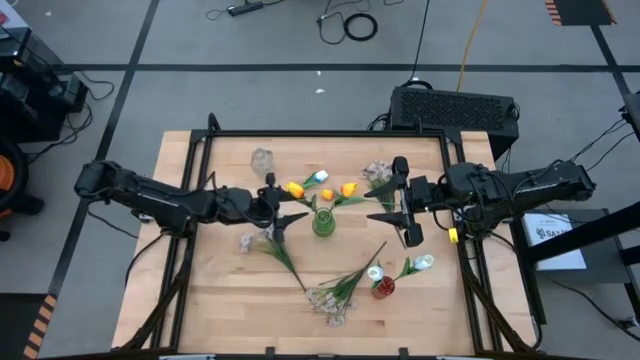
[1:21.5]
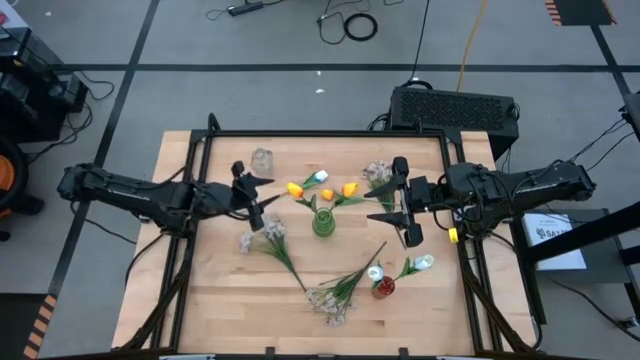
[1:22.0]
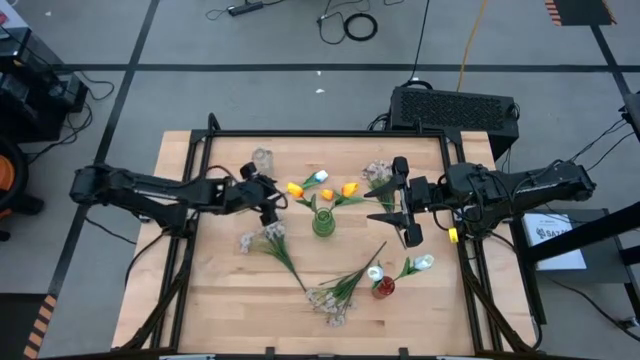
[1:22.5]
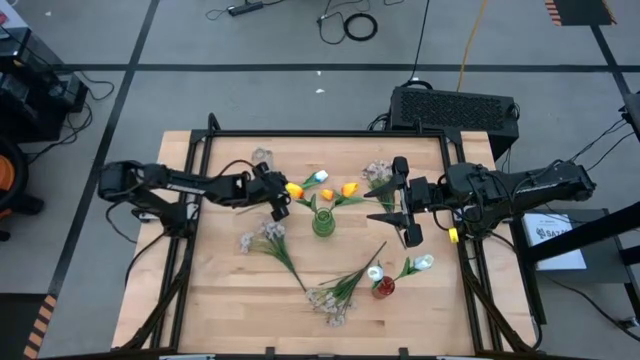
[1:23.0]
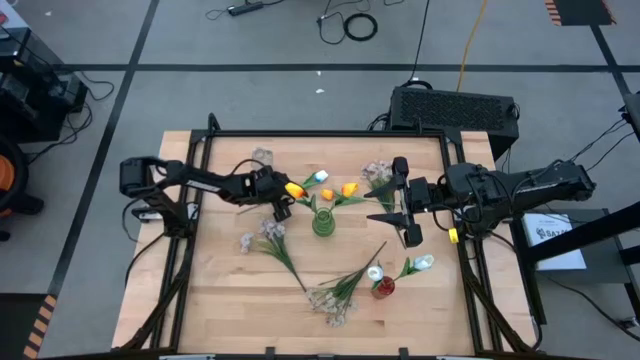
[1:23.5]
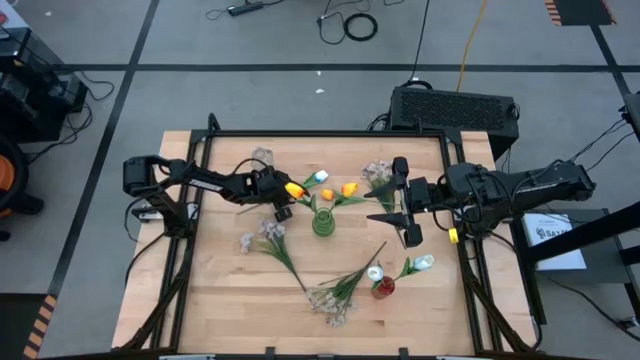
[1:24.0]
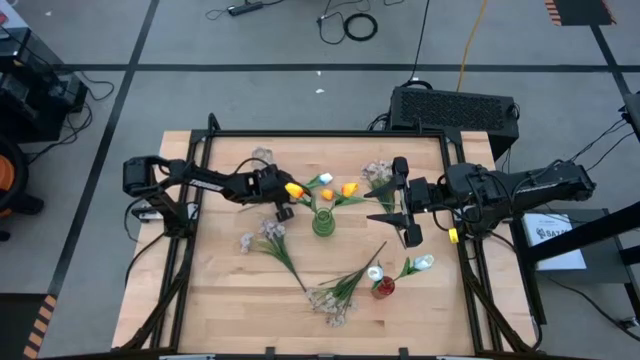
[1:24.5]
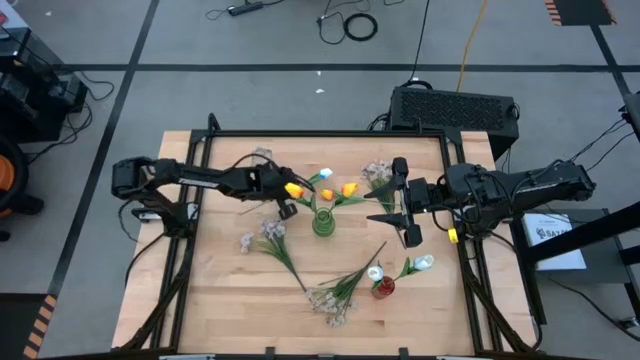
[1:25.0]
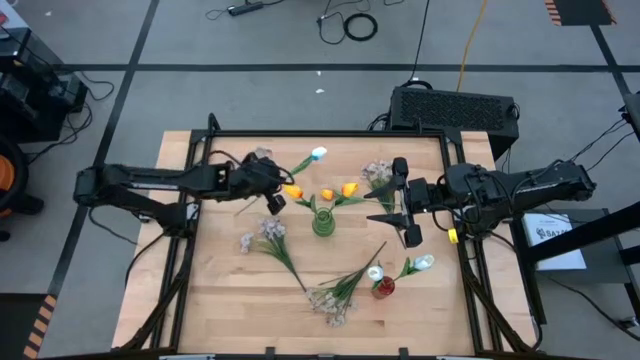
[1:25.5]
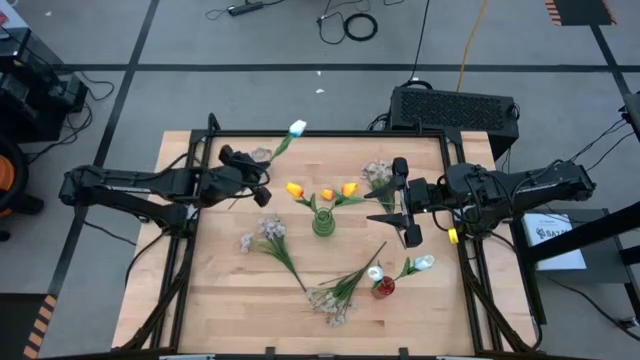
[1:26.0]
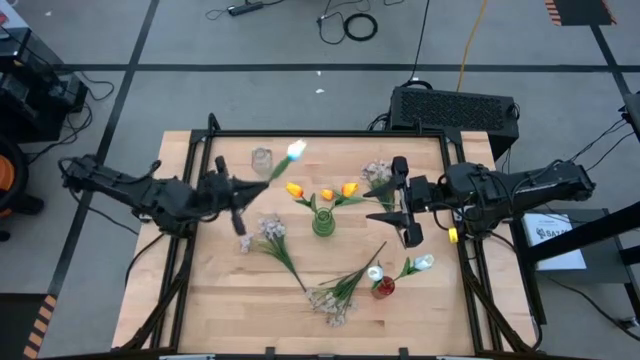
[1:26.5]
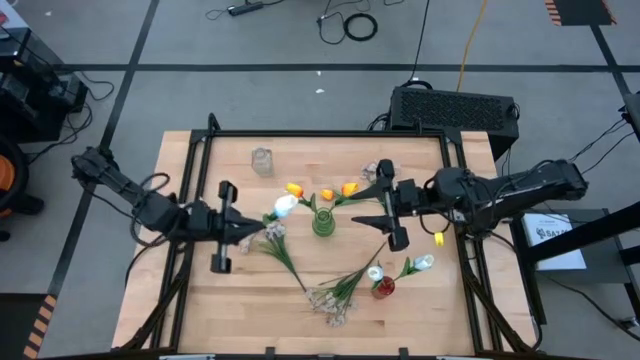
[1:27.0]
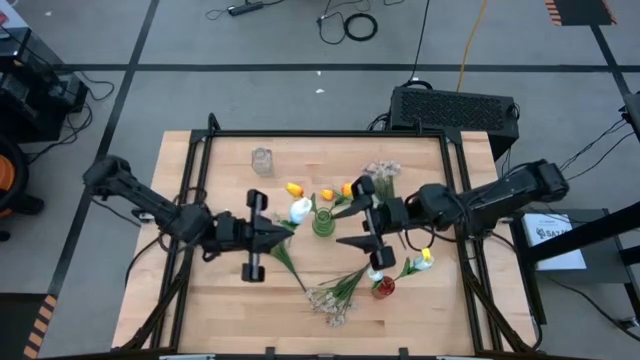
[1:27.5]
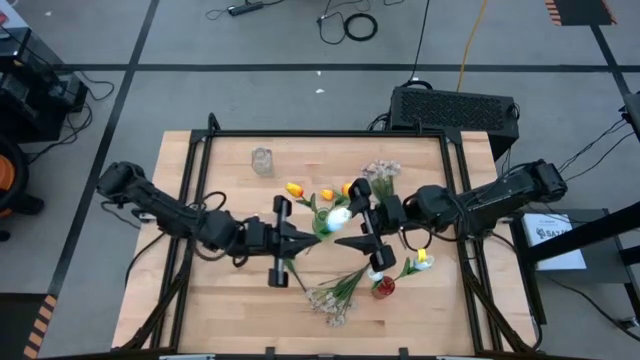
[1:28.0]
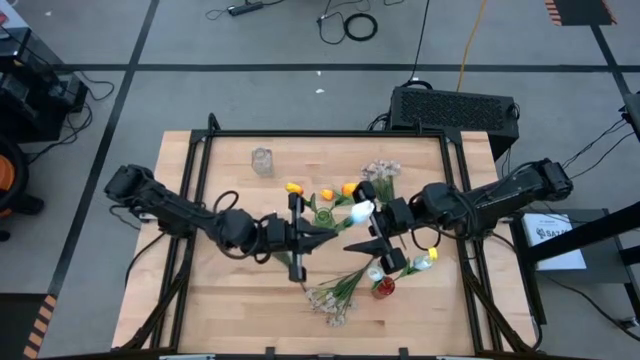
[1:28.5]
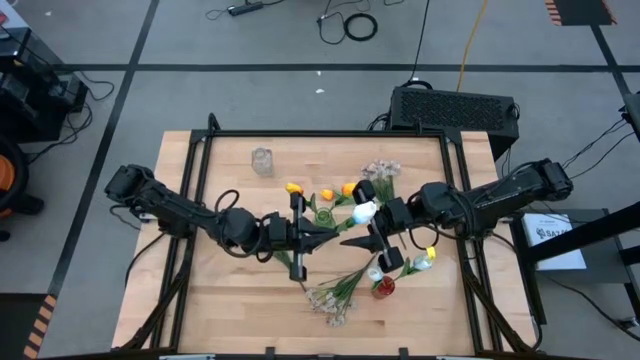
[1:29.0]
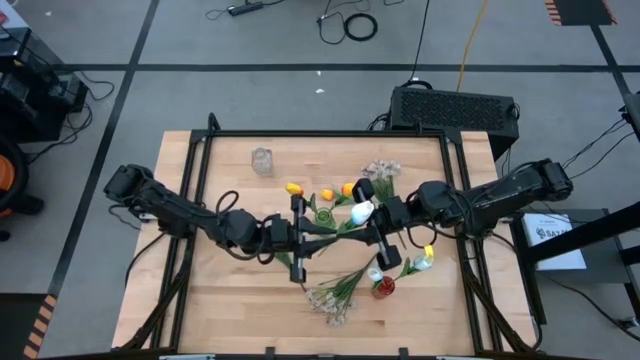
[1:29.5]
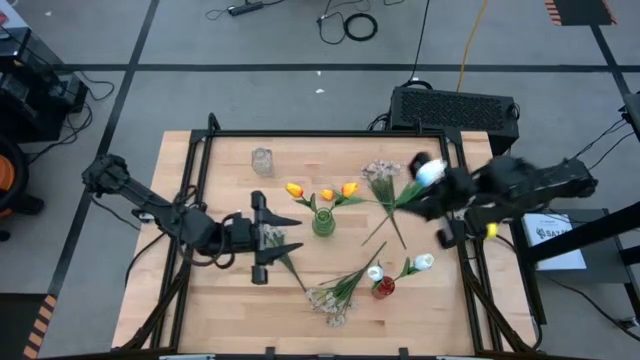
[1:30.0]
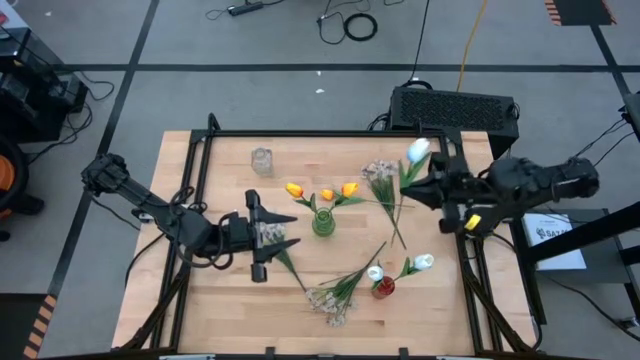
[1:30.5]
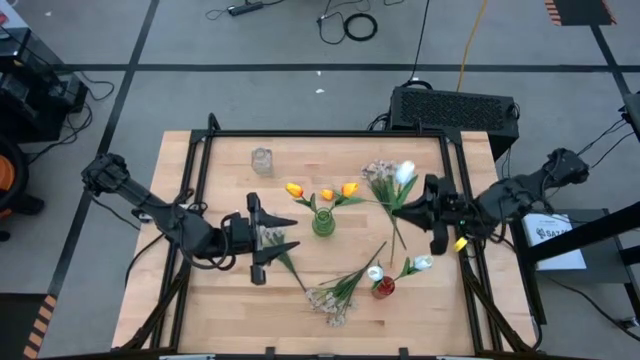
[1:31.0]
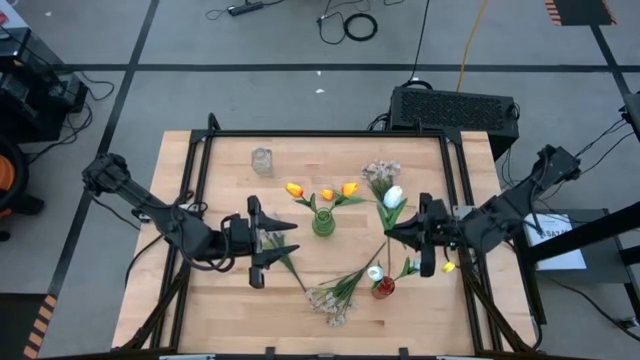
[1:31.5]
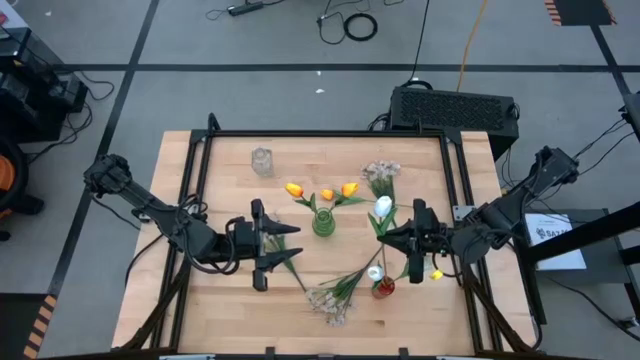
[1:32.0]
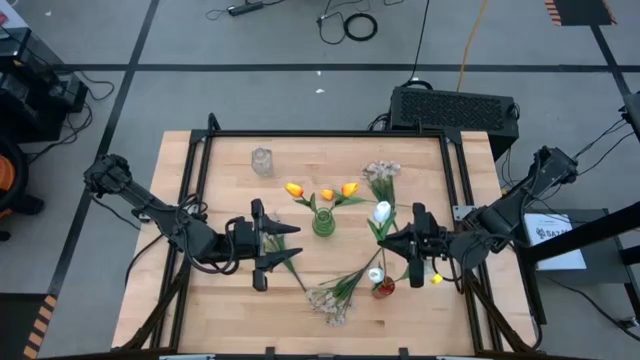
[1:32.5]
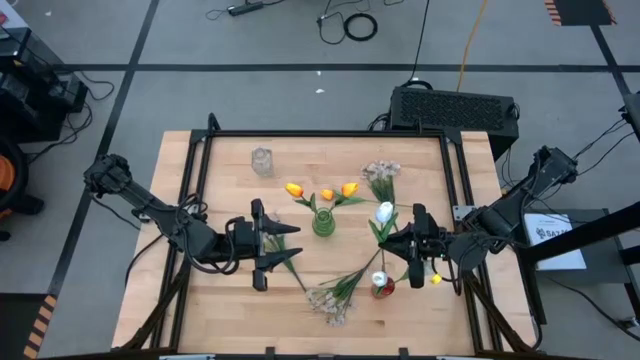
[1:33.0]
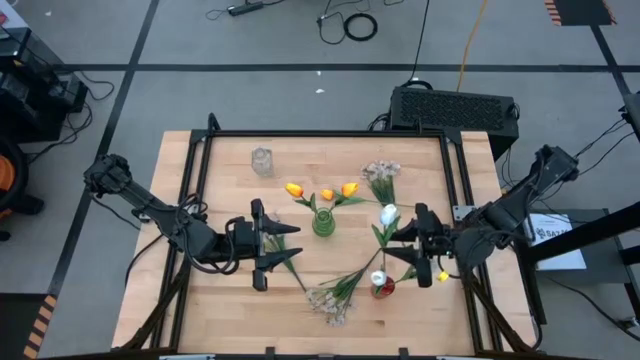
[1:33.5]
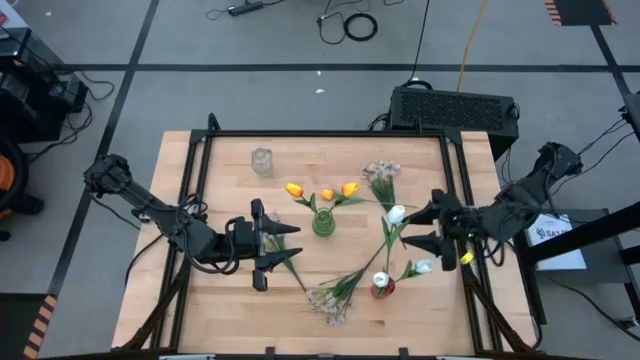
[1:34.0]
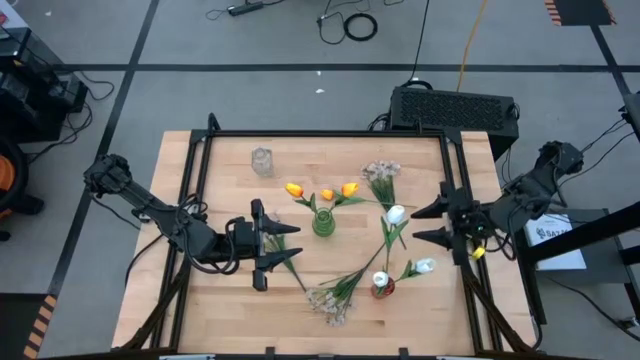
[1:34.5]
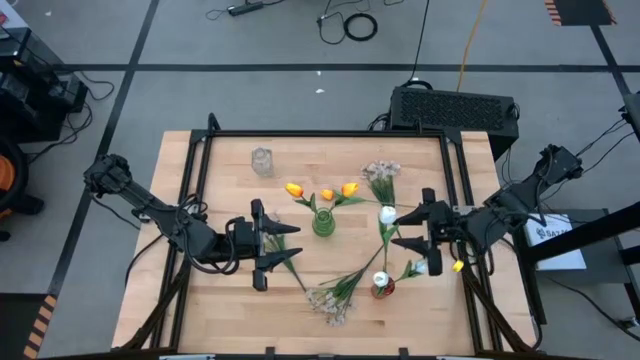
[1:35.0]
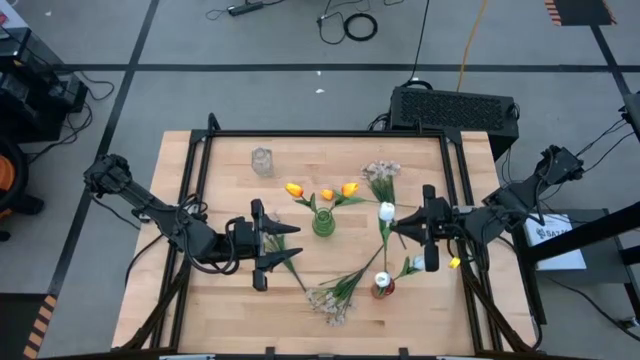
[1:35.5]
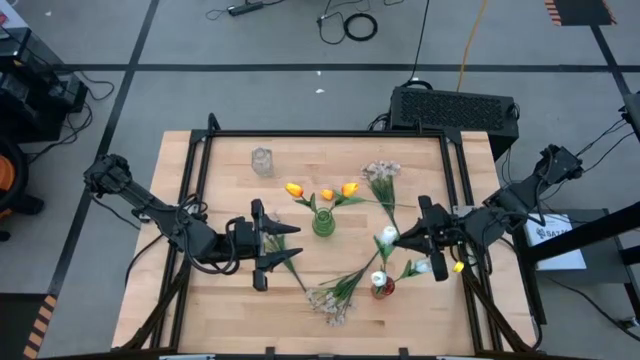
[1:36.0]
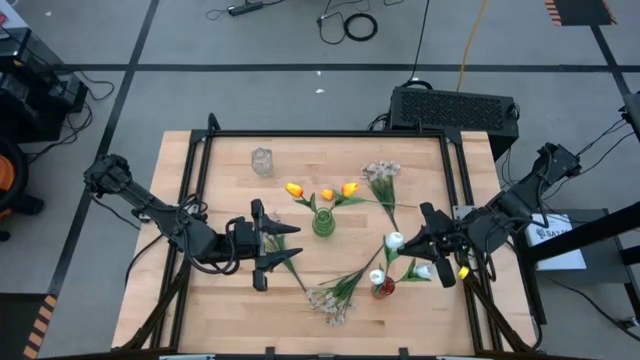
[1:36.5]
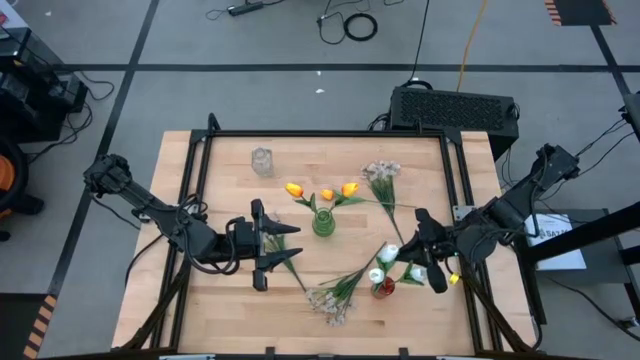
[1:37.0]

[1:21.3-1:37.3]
Task: Sort flowers into vase by color
Put the white tulip into the red vase

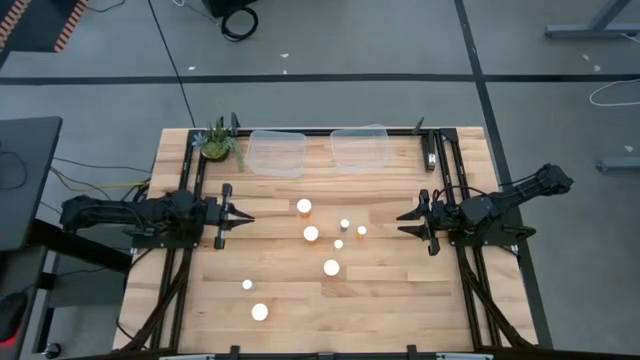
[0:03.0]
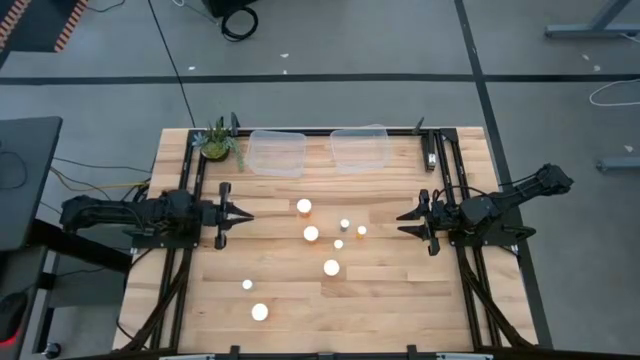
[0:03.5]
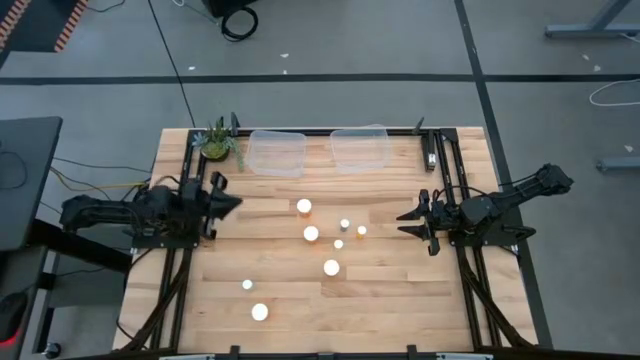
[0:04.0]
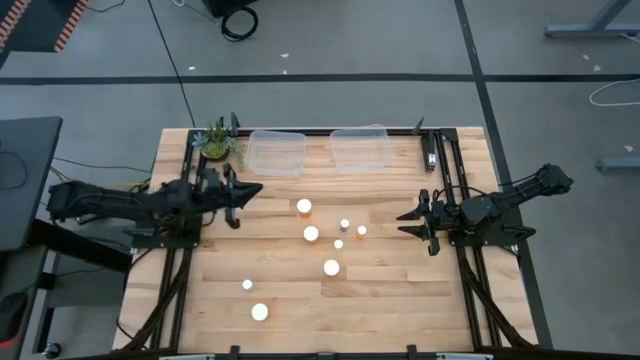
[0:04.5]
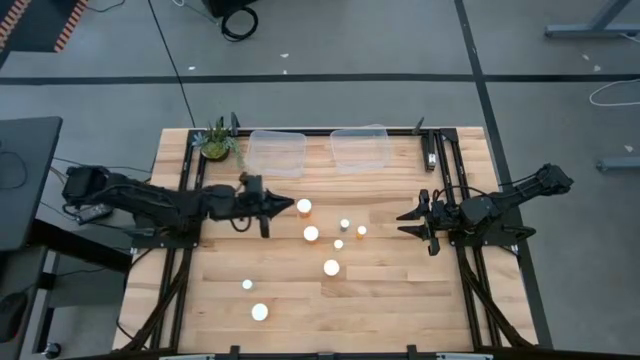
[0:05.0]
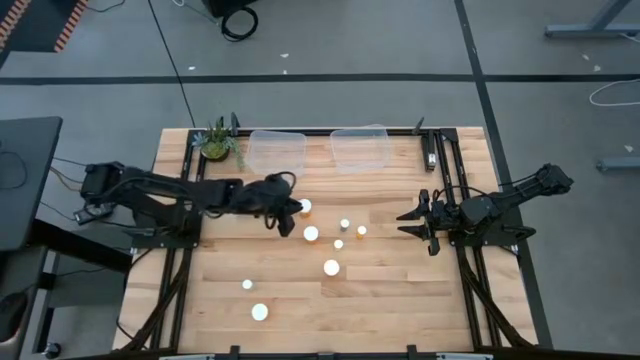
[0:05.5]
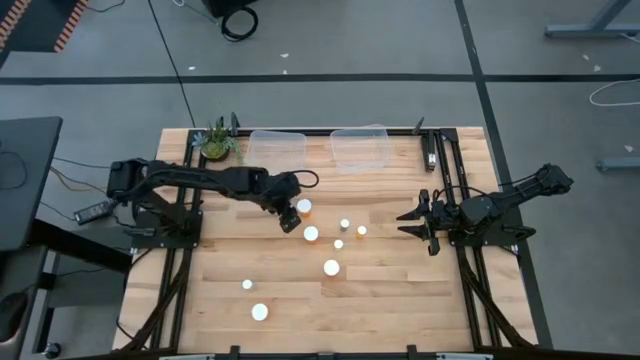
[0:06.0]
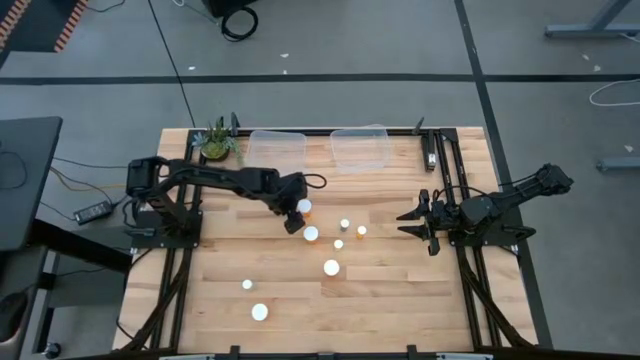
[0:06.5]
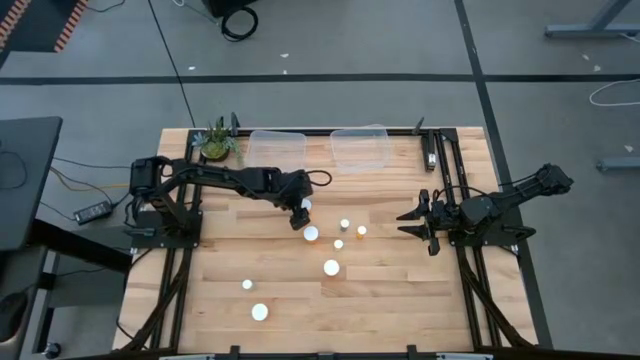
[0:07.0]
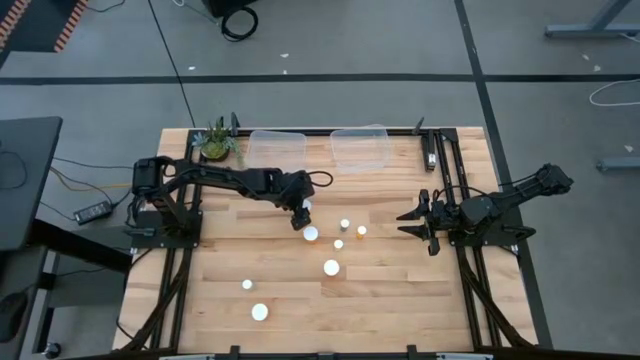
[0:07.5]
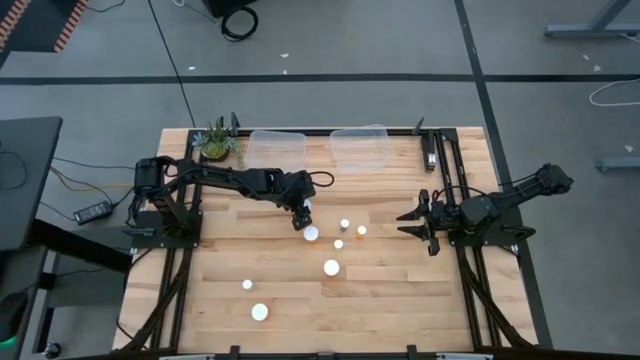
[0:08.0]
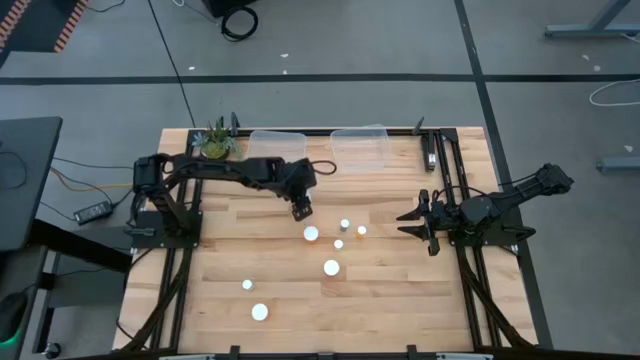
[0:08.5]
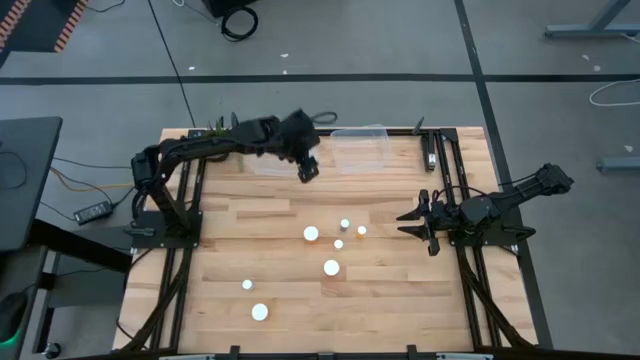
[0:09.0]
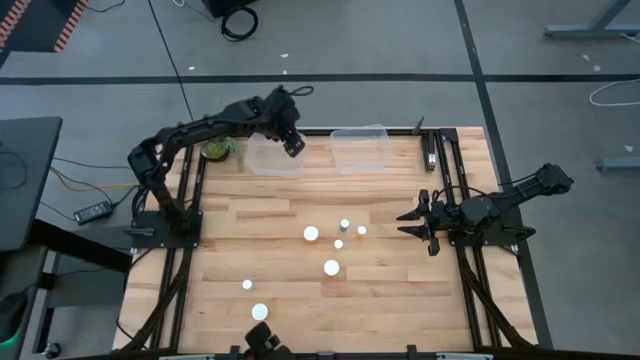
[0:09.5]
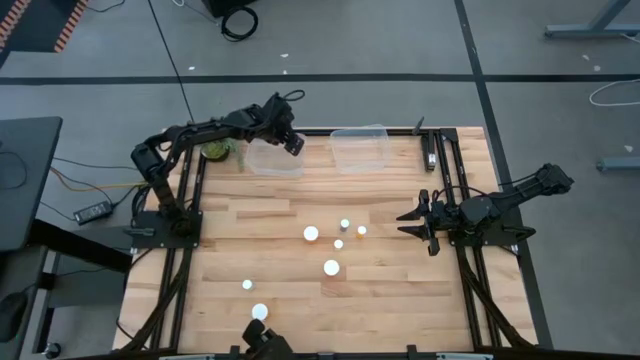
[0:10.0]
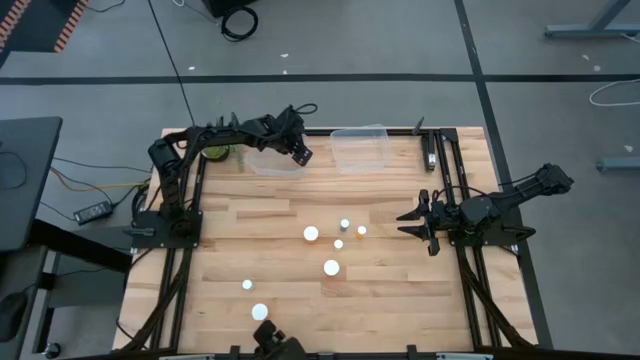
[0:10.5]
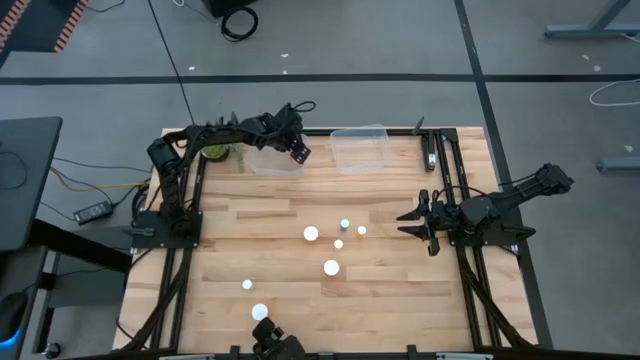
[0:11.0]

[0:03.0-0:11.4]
Task: Pick and place medicine bottles into bin by pill shape (circle, oval)
Put the top large orange pill bottle into the left bin
